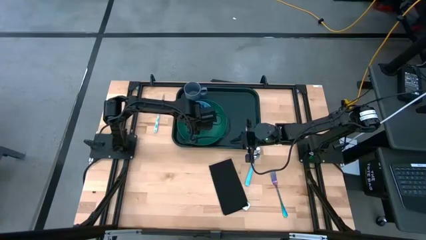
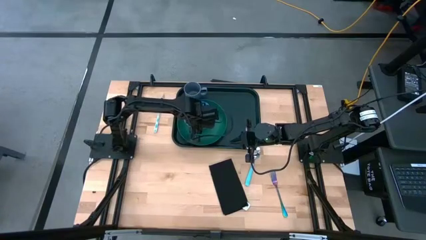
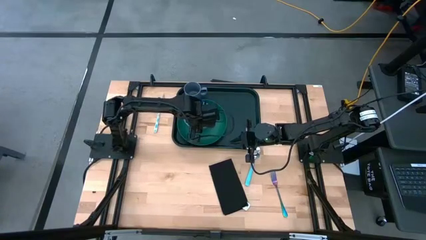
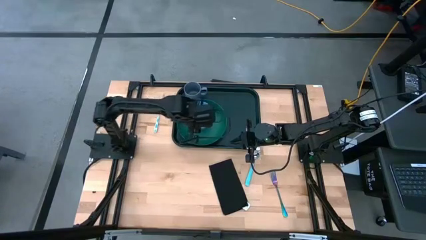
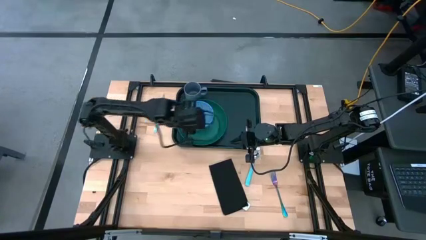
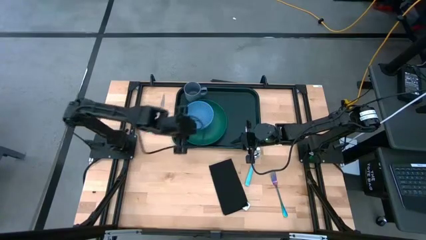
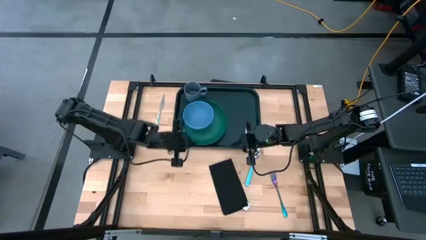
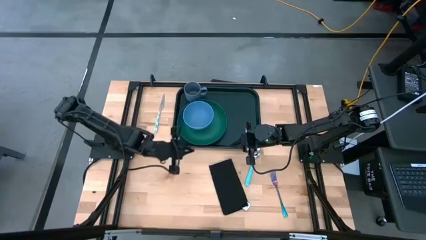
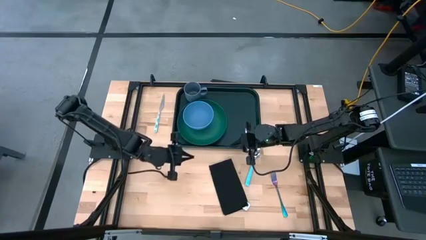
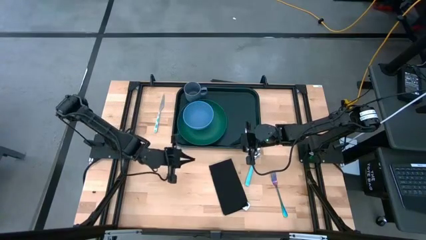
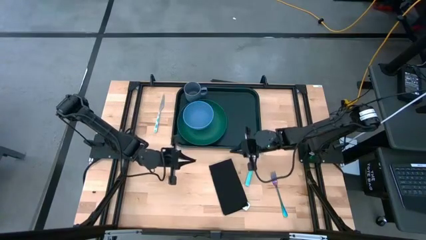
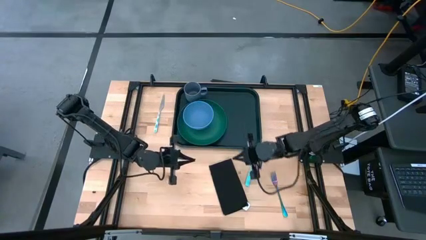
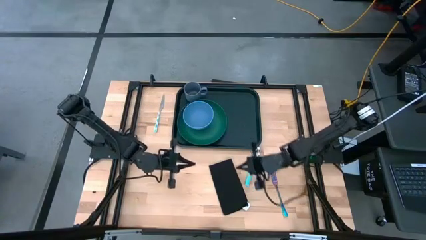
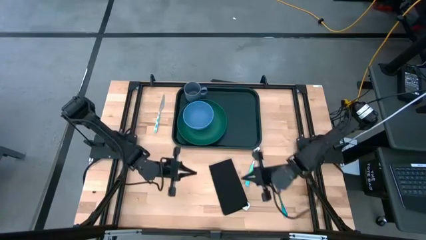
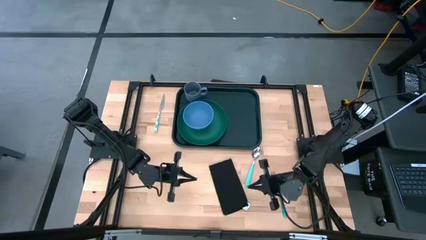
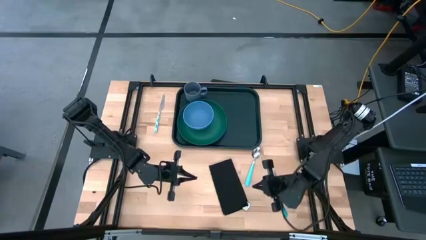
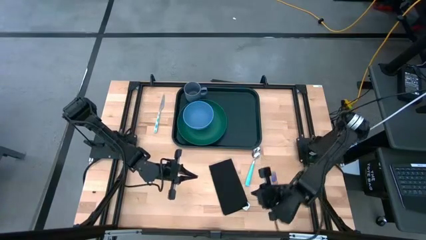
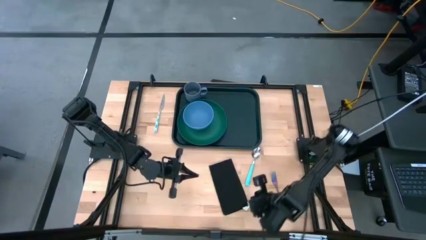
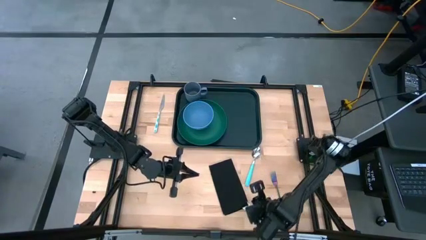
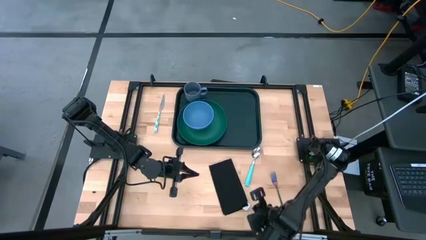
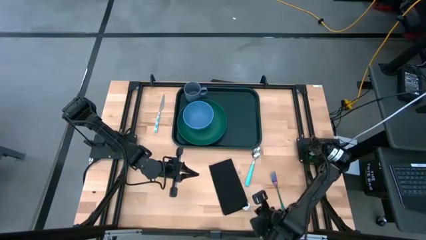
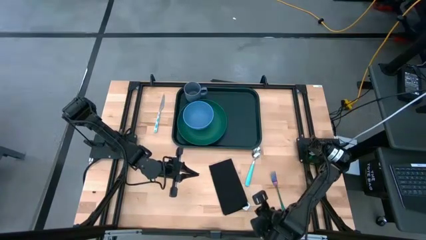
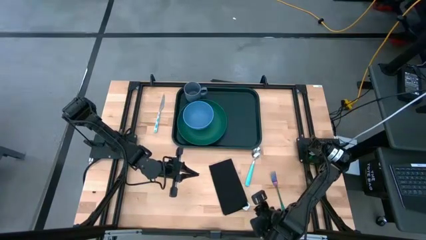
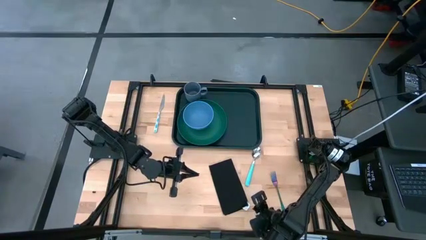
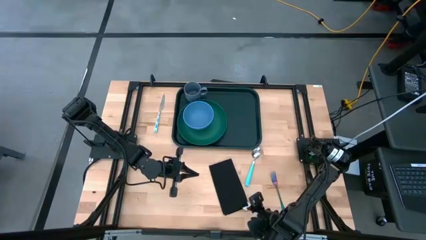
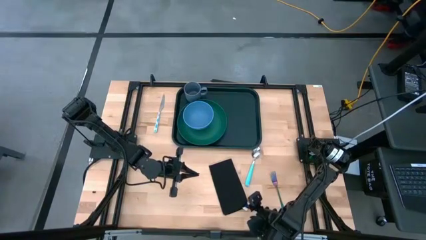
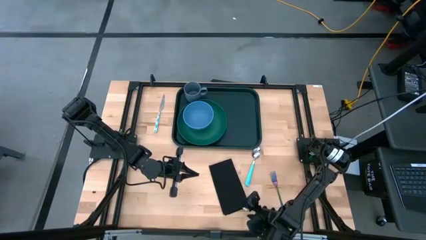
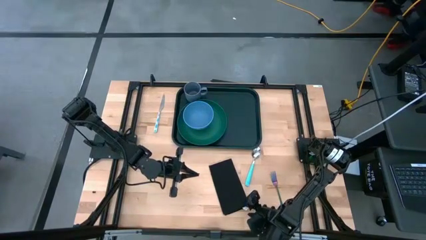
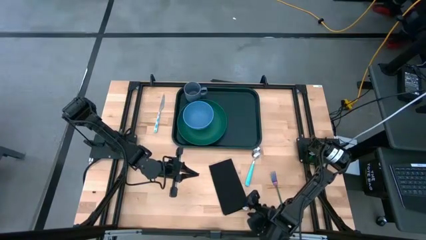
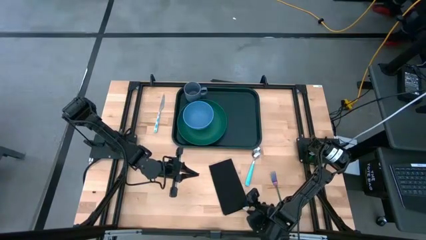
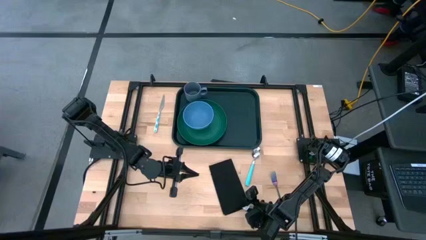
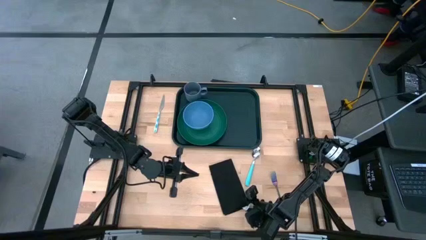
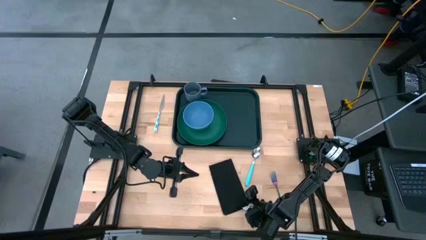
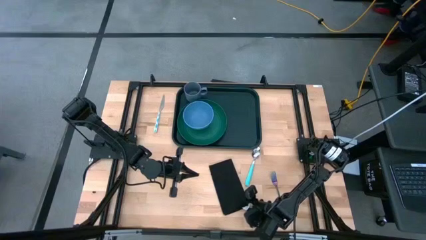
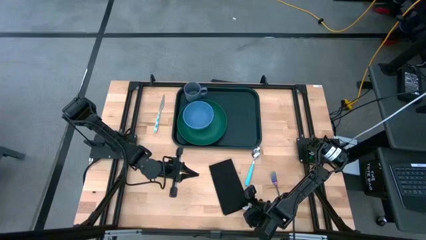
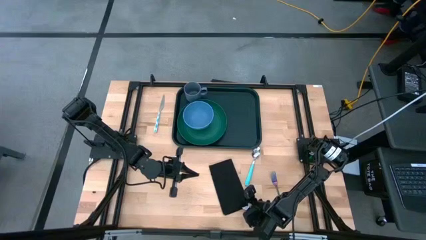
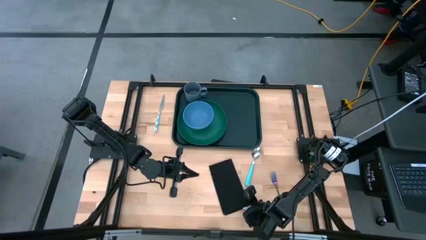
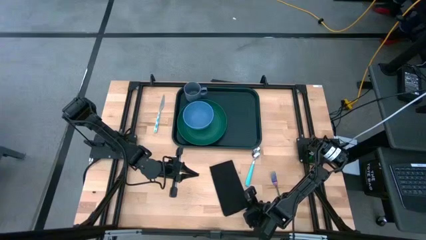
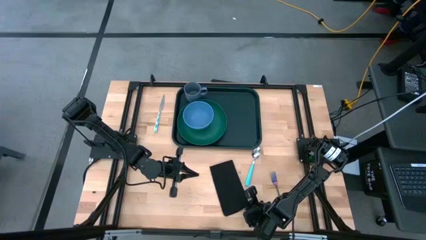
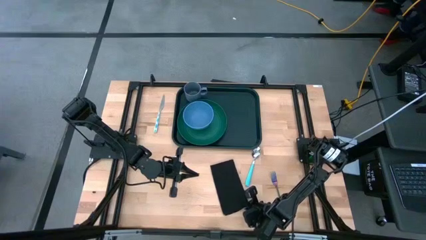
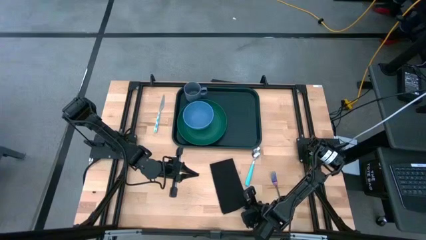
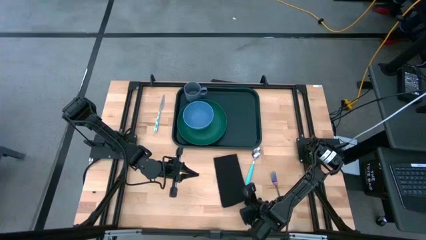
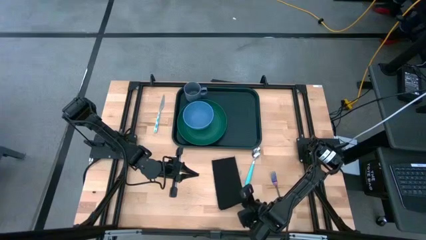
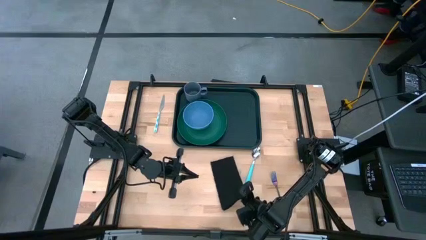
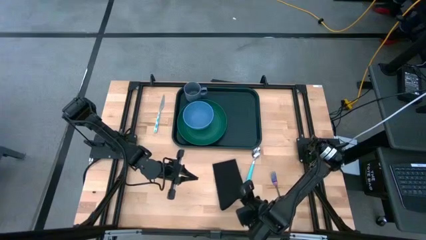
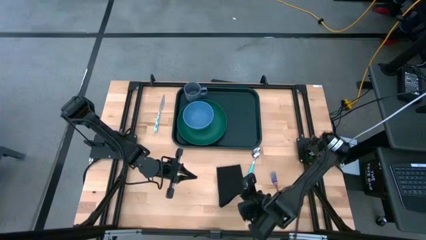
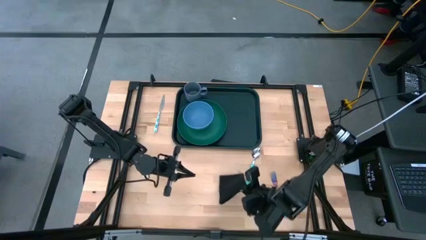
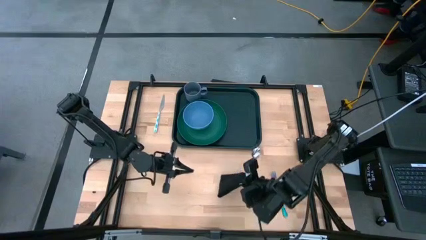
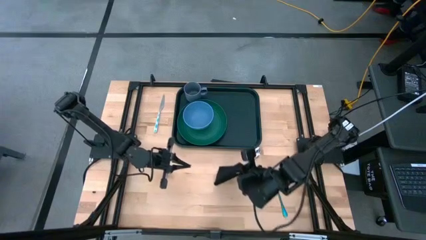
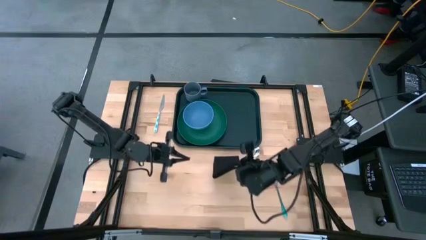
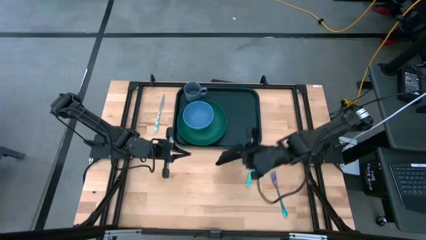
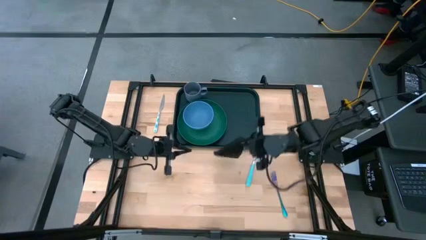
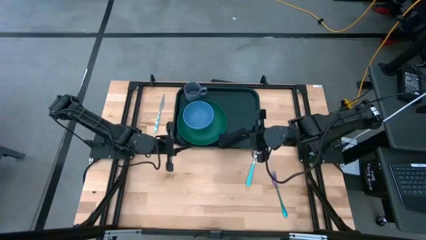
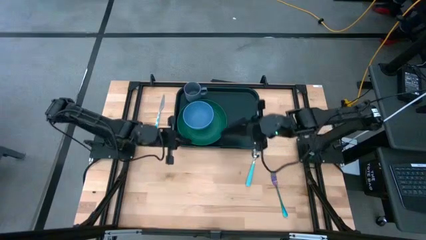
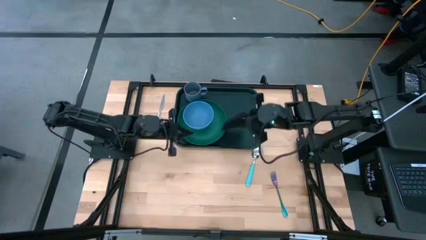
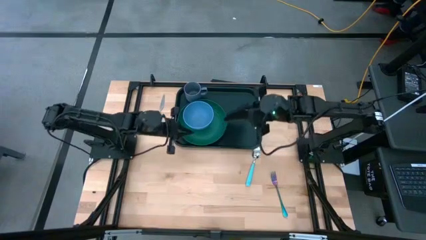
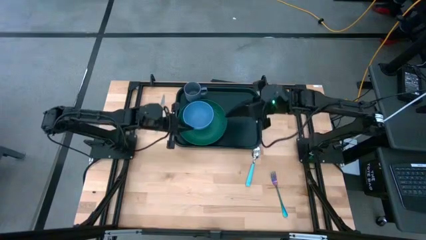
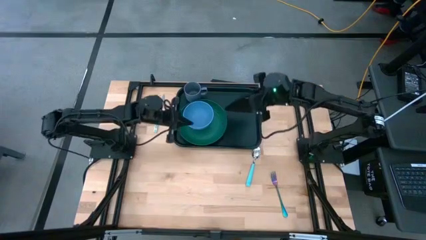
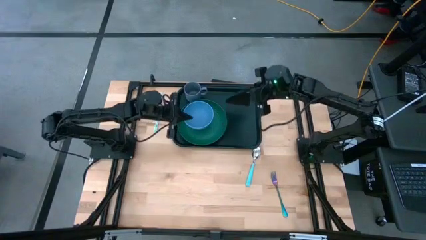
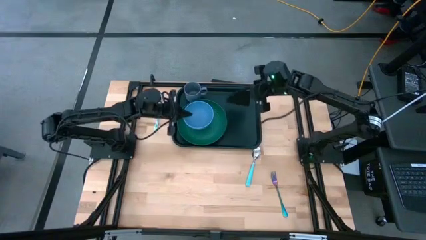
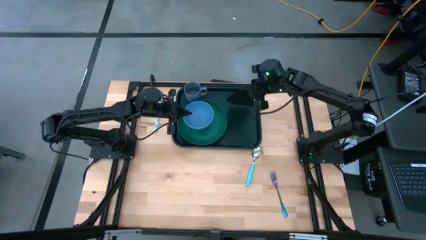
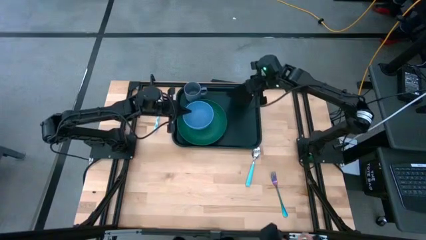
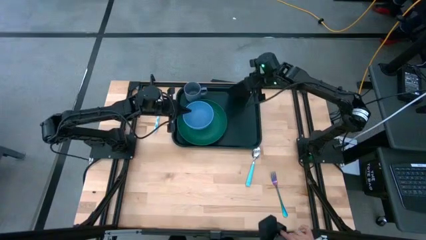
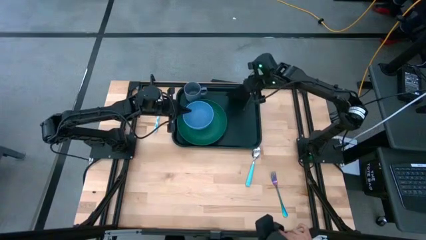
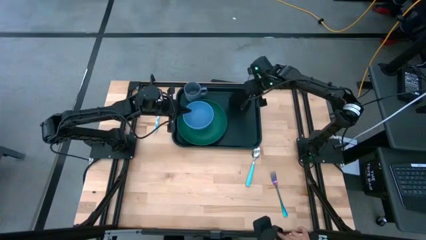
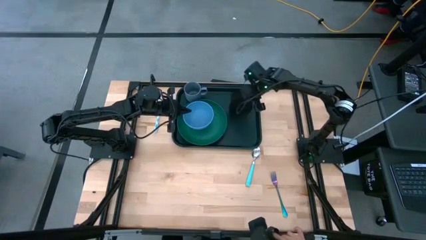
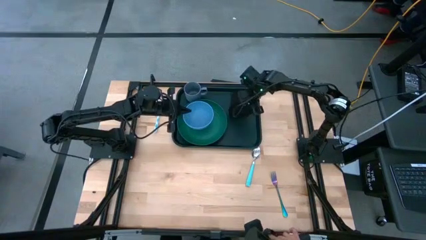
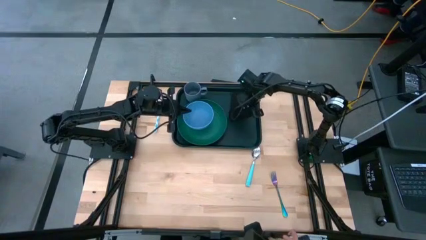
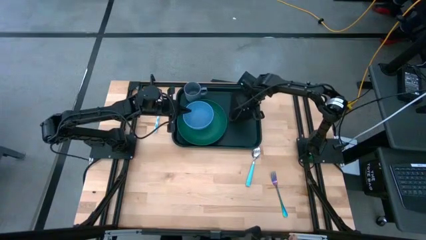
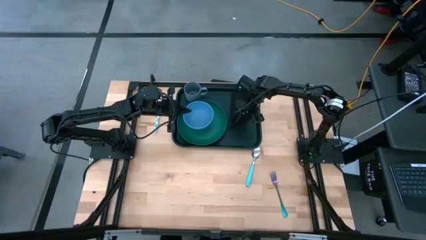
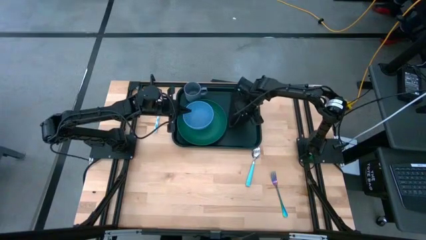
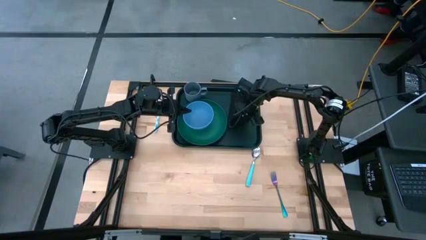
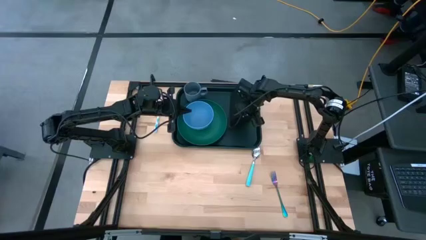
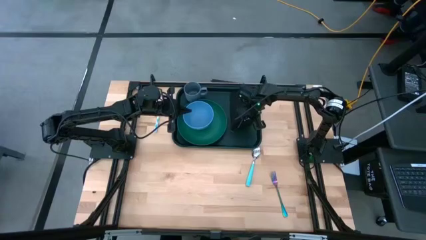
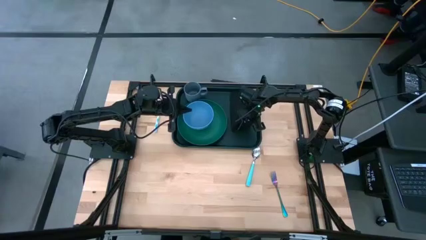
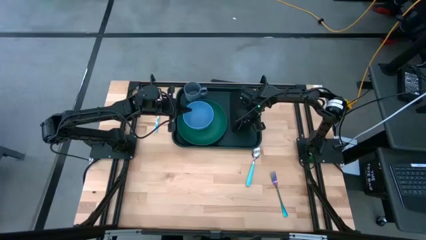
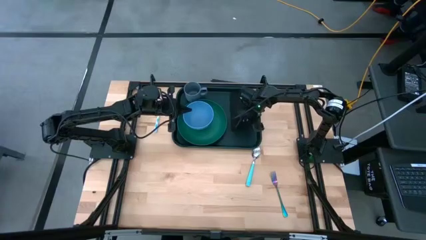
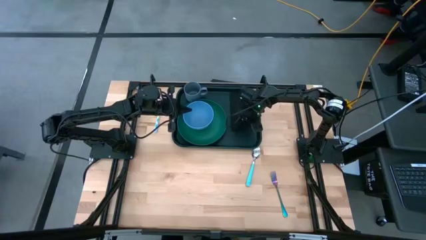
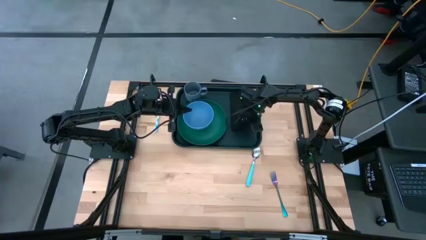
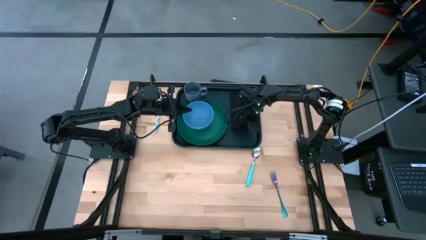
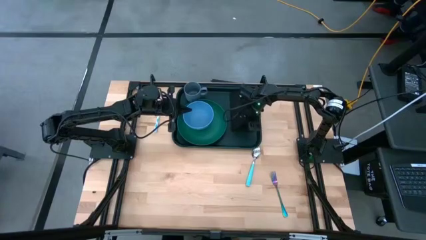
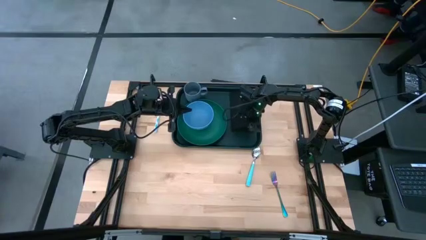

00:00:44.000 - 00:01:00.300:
Task: Set up tray
Put the black table napkin to the right of the green plate on the black tray
